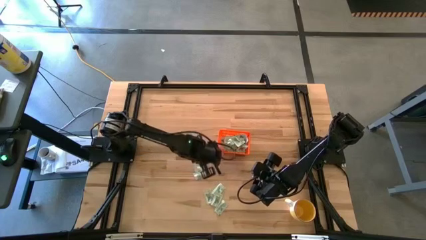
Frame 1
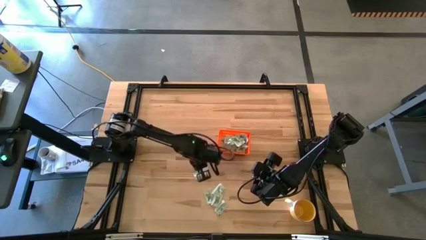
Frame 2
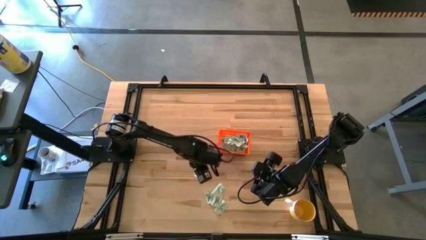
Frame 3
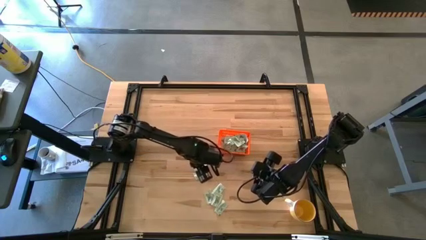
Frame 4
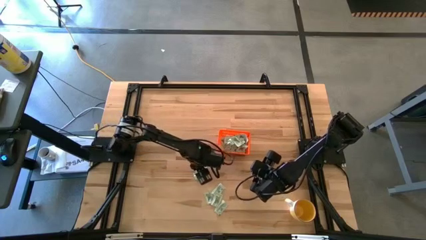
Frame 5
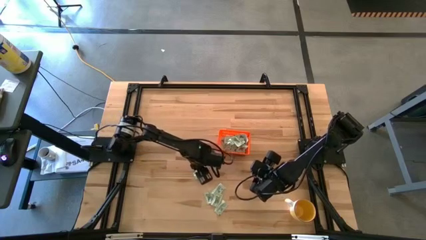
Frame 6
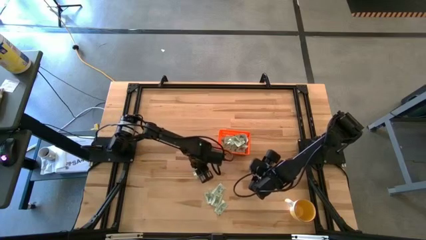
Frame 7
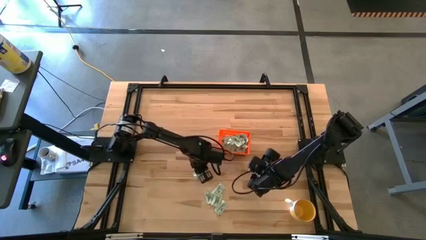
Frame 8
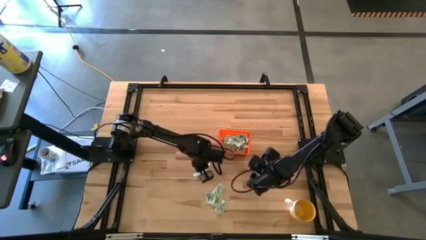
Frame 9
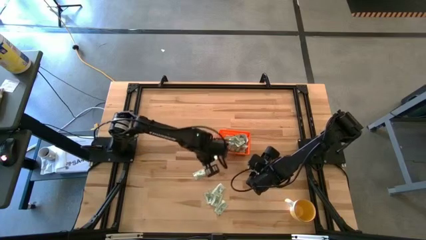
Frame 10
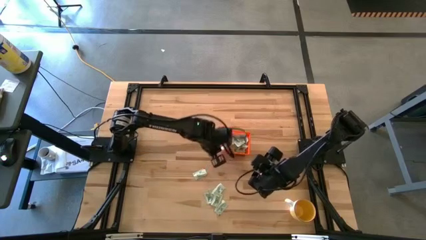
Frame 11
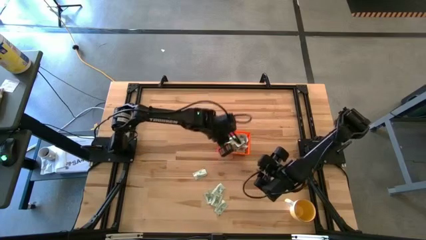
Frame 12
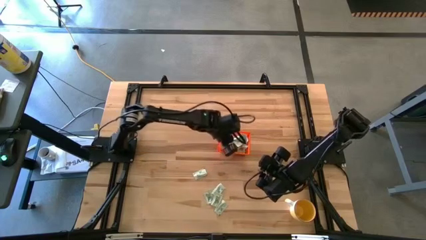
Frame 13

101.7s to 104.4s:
Task: Pick and place Stevia / Truvia into bins
Put the white stevia packet into the orange bin

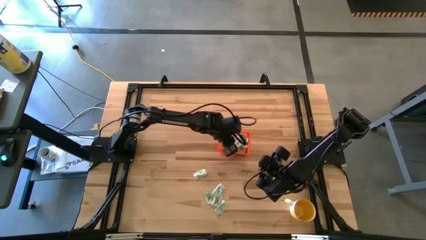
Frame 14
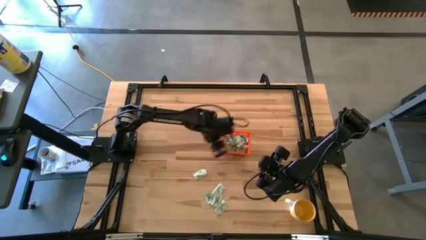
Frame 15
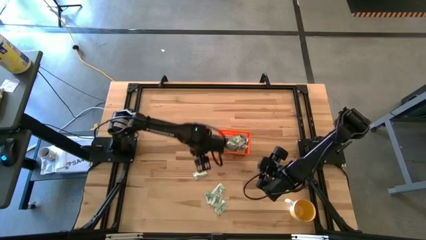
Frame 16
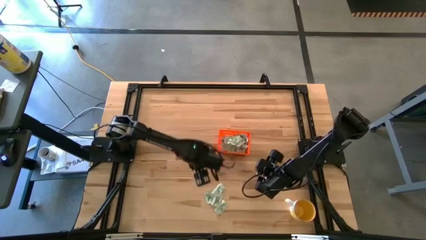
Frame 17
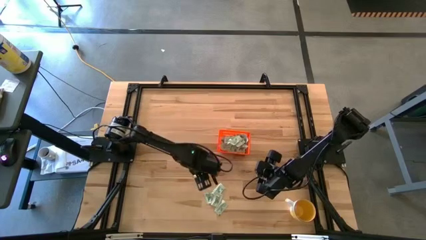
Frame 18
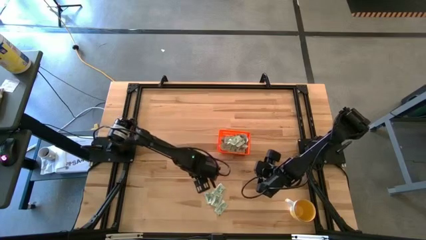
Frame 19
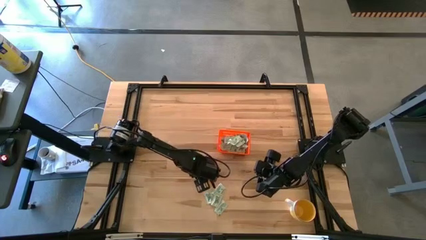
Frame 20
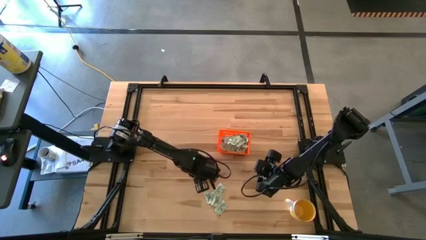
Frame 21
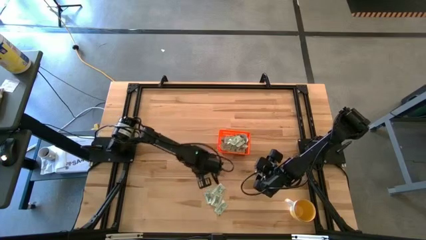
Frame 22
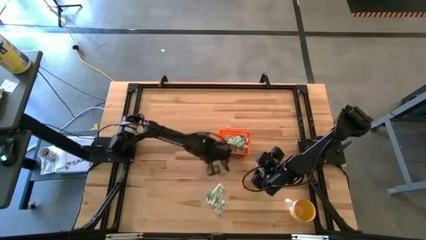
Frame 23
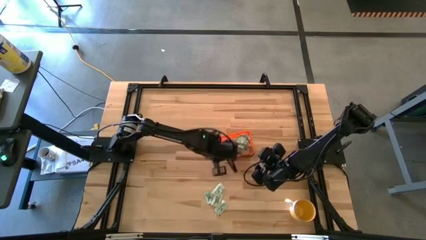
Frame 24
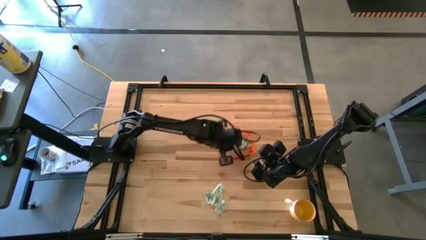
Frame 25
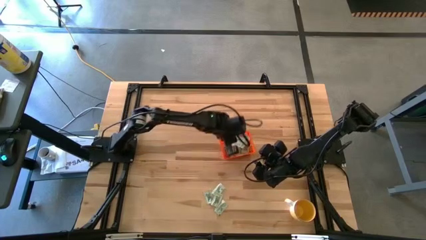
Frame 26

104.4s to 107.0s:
Put the white stevia packet into the orange bin

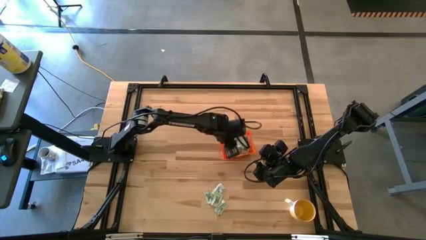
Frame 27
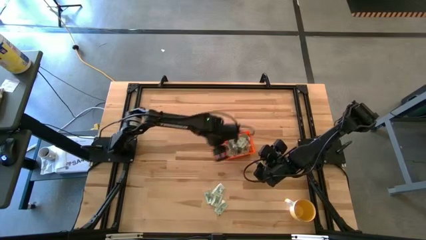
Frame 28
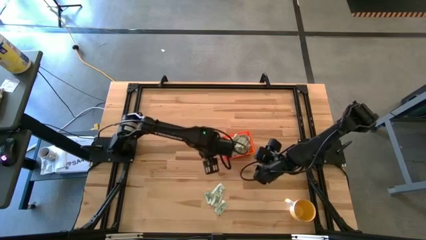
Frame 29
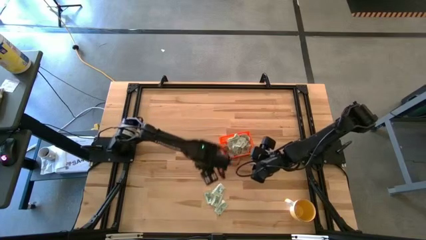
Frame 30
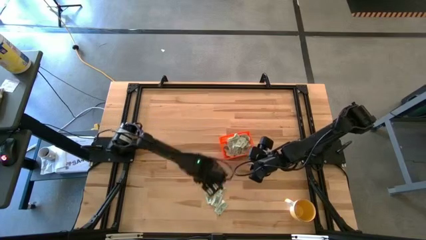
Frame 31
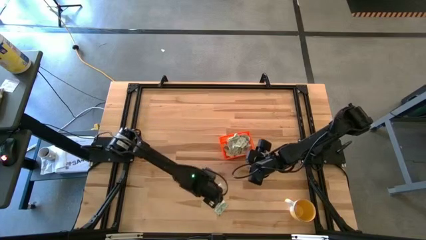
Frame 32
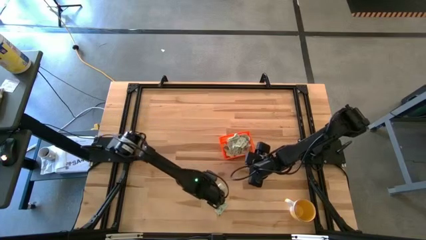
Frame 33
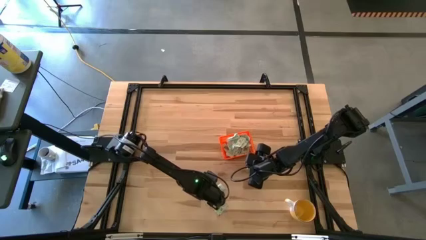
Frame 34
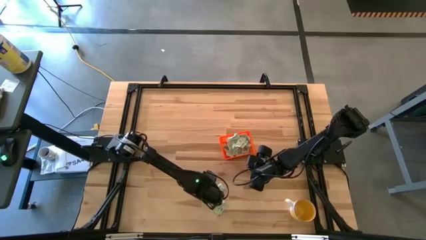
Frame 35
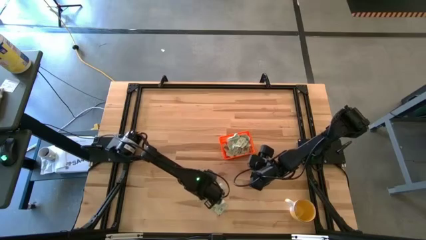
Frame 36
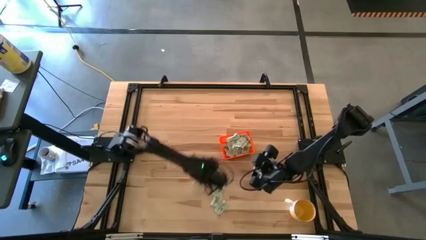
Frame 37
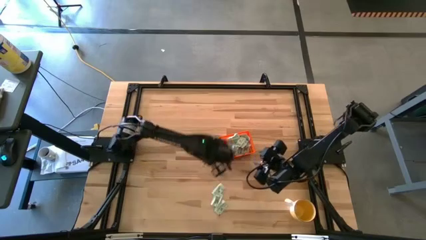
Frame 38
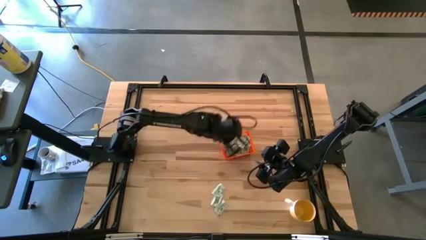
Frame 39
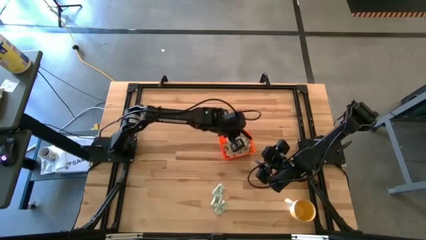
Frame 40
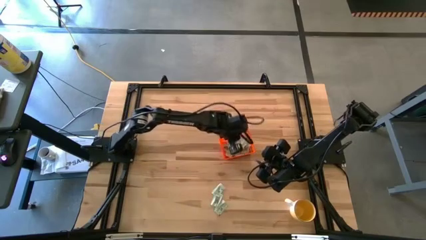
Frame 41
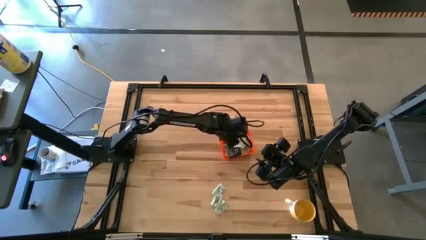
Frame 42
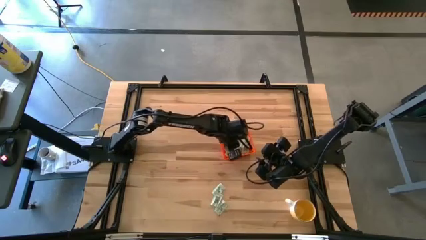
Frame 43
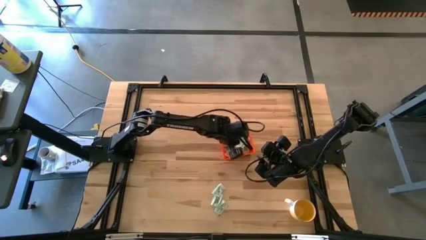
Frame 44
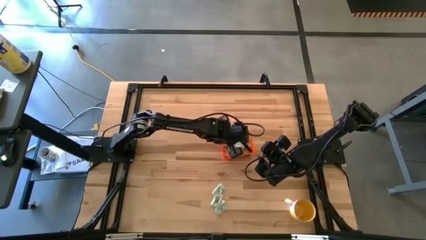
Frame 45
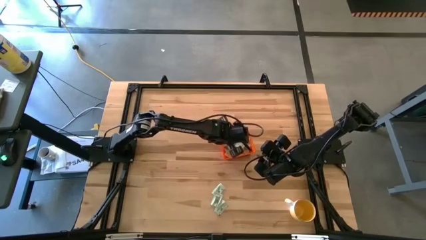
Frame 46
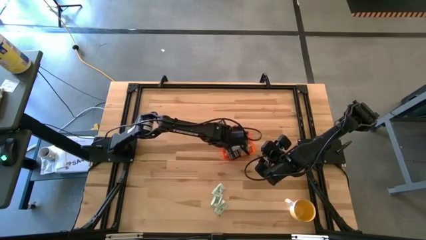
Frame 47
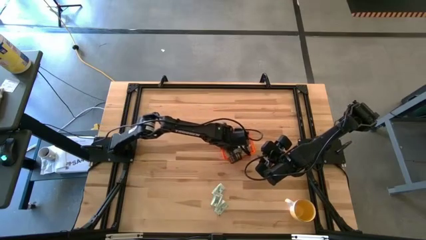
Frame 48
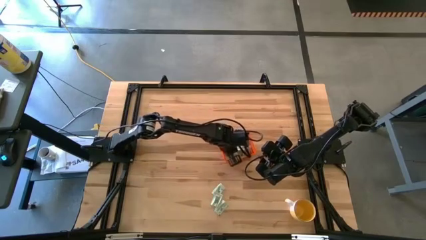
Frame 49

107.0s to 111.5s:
Put the white stevia packet into the orange bin

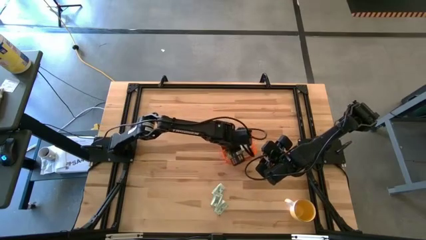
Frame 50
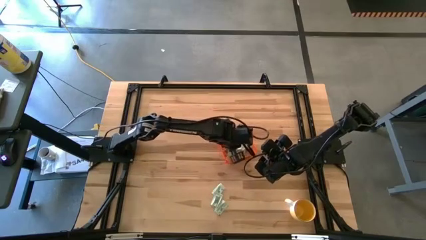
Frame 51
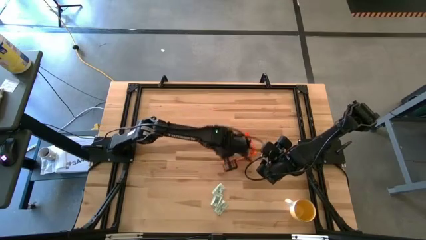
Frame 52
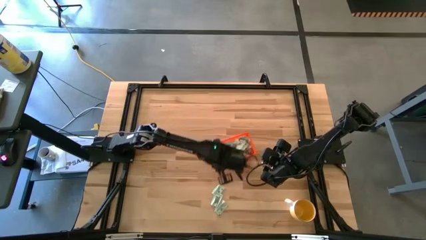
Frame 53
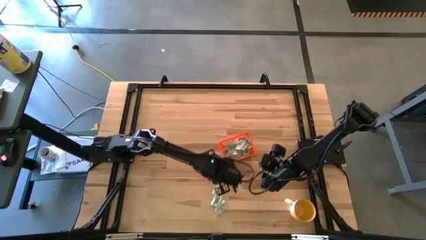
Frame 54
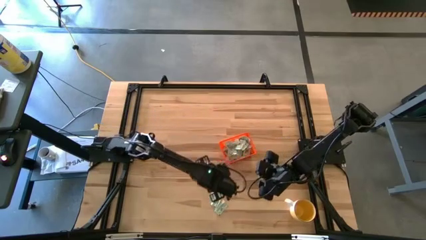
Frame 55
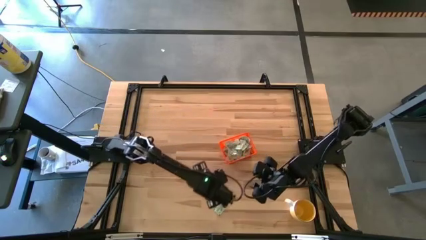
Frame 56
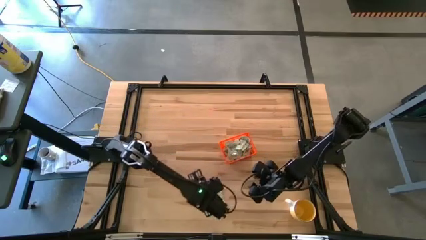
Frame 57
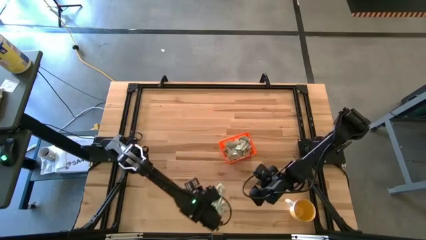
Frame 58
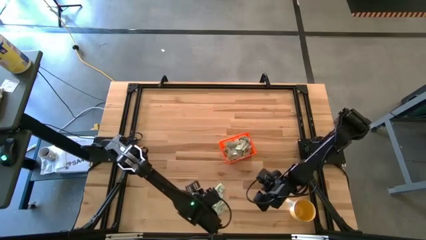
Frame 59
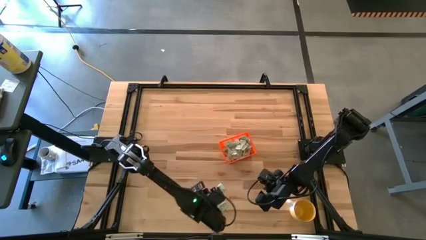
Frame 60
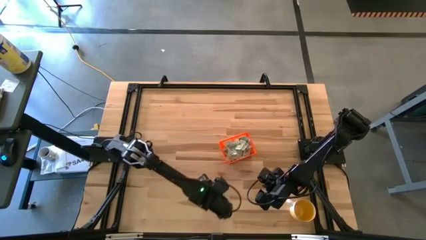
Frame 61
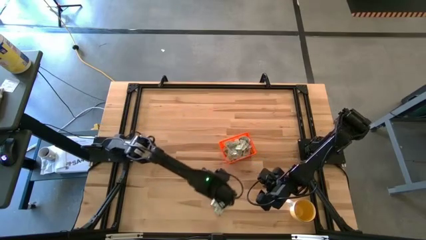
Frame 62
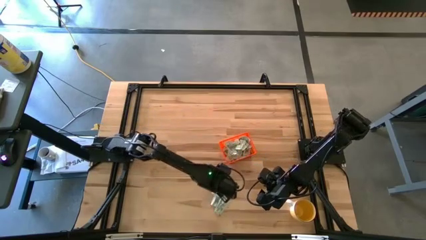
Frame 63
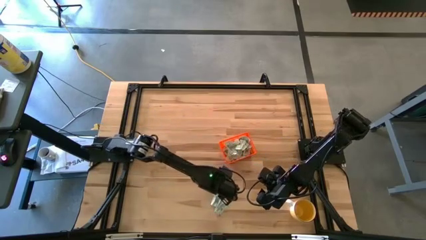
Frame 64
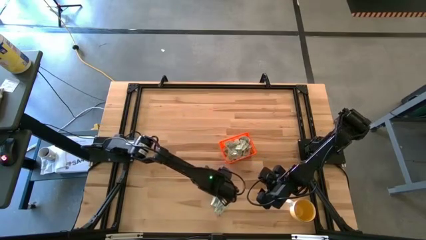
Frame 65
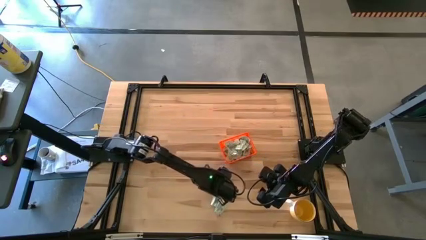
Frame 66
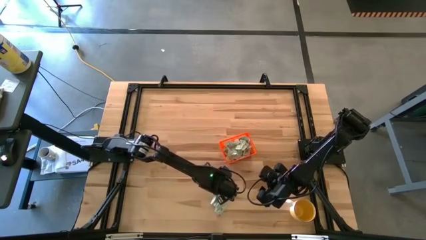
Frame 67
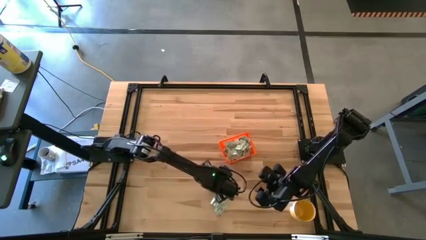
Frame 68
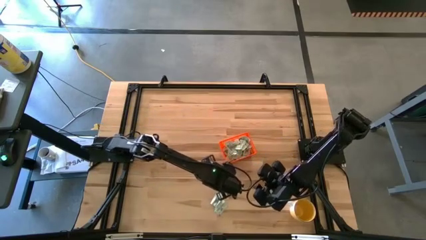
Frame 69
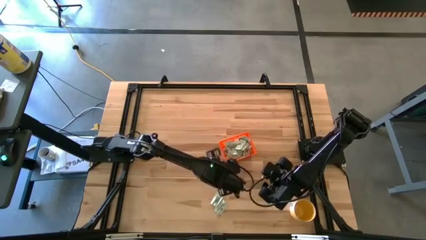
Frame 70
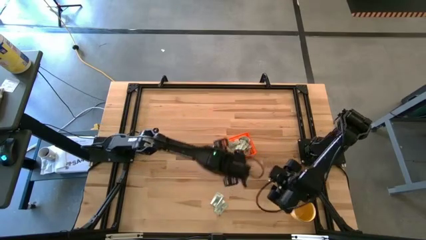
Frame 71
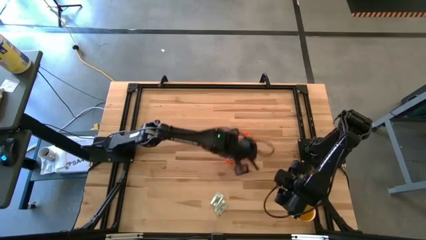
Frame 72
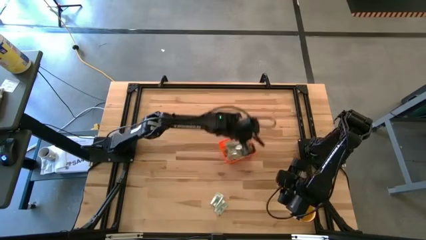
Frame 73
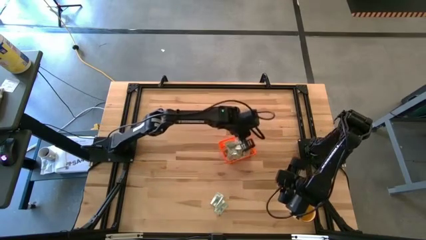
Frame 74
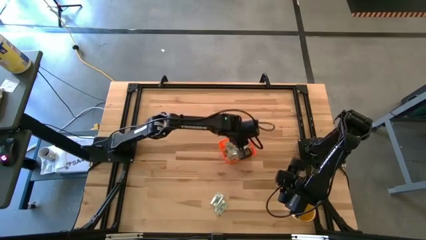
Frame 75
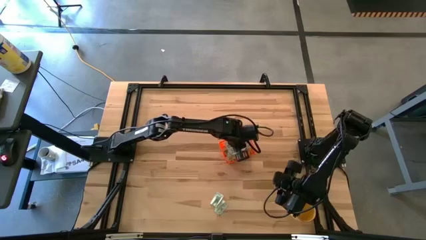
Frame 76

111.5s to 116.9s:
Put the white stevia packet into the orange bin

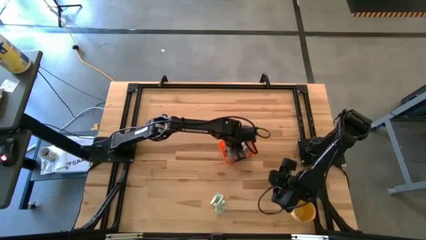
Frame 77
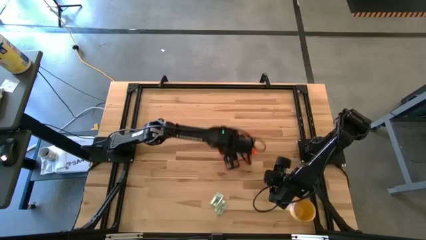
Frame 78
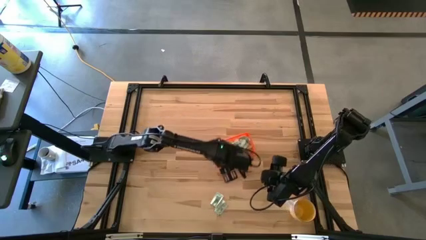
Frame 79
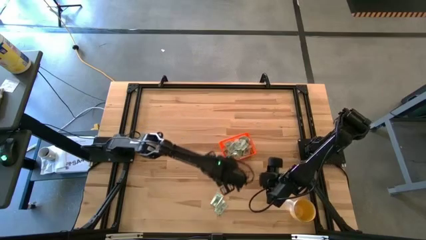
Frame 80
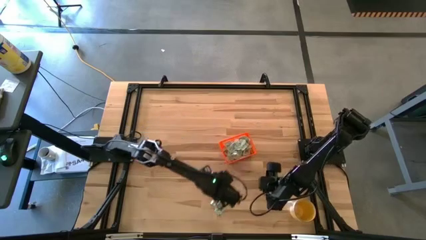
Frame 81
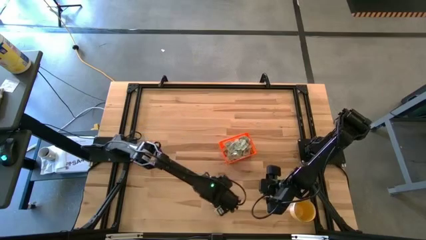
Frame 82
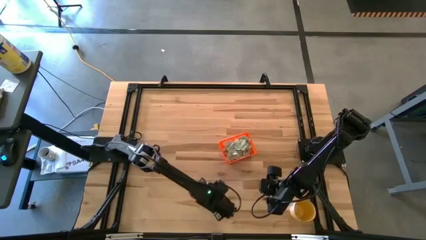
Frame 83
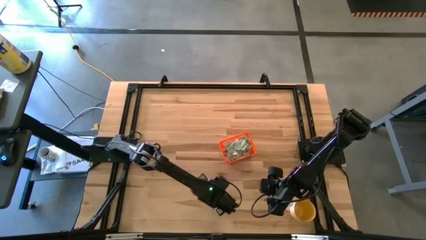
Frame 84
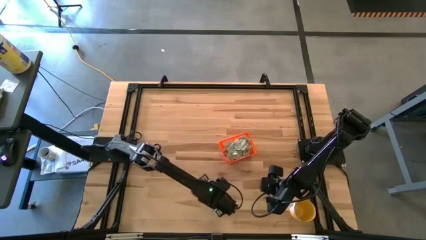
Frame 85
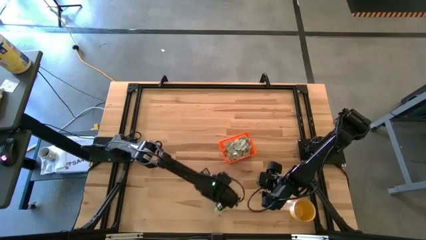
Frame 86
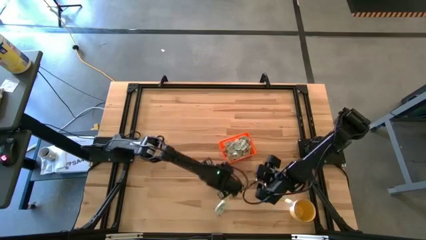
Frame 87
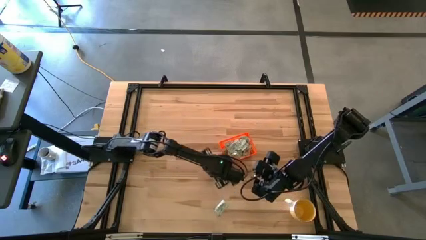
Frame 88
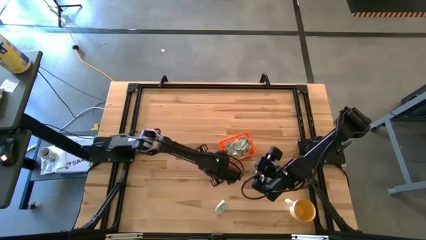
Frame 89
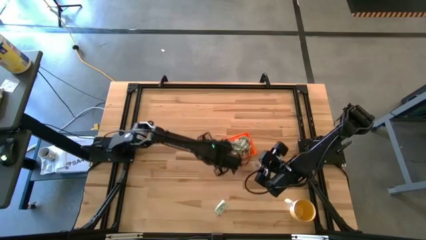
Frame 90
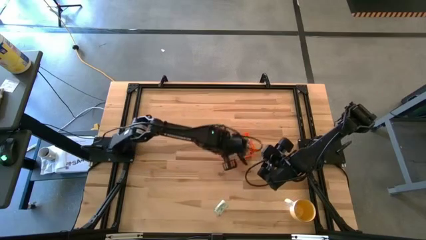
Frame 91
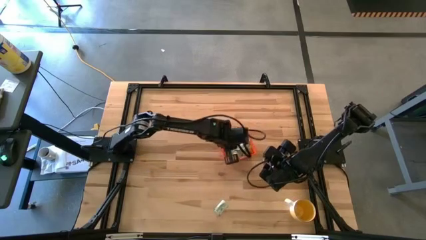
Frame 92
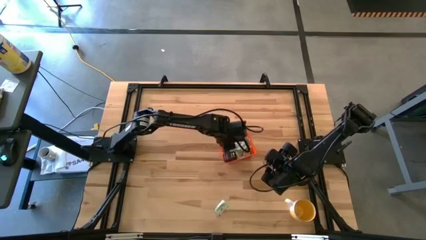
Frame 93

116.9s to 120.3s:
Put the white stevia packet into the orange bin
